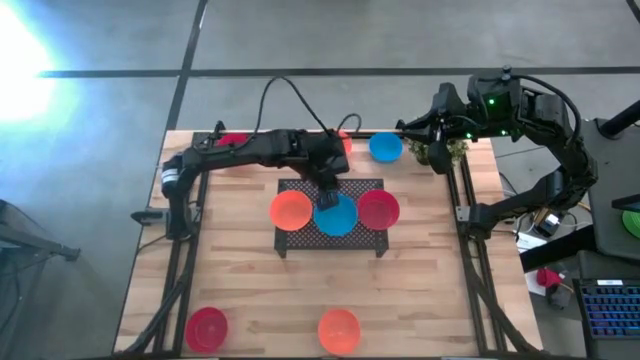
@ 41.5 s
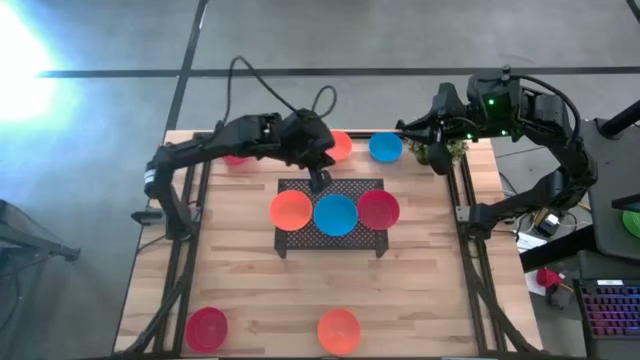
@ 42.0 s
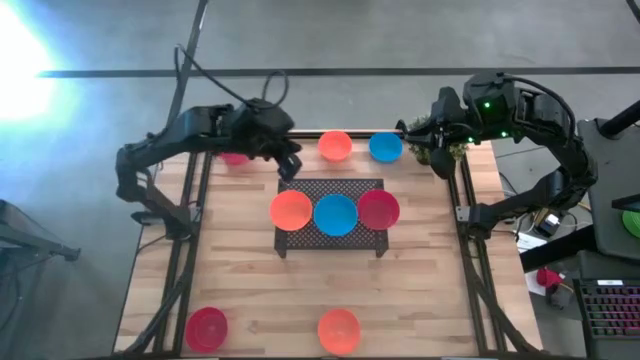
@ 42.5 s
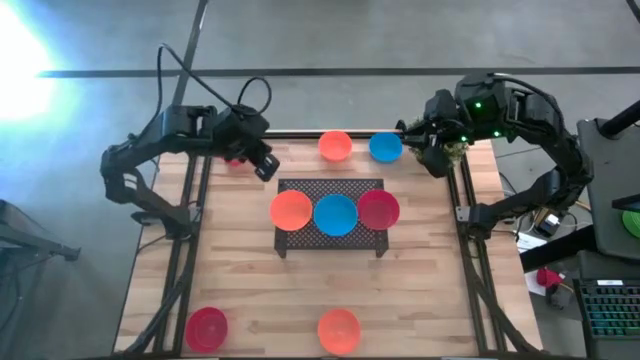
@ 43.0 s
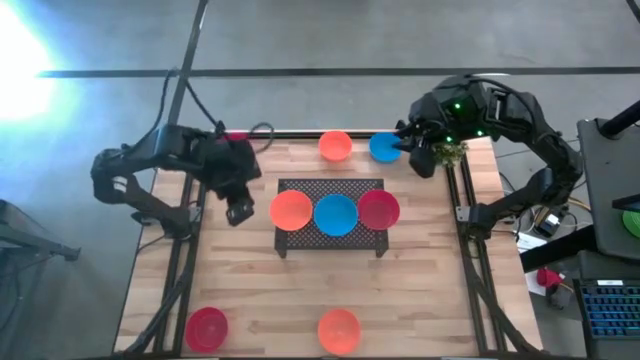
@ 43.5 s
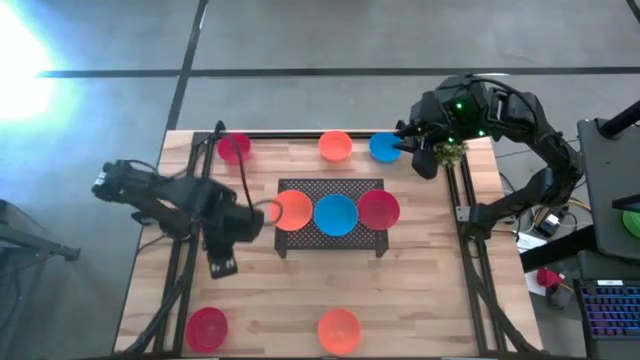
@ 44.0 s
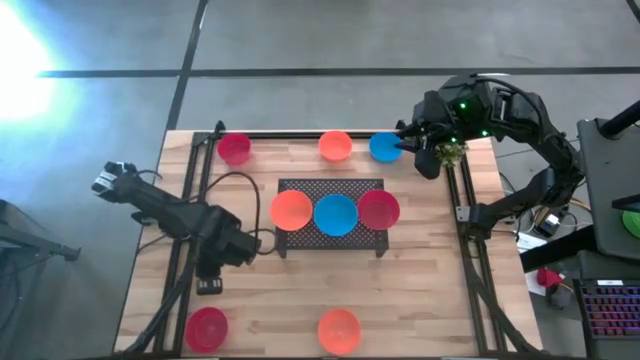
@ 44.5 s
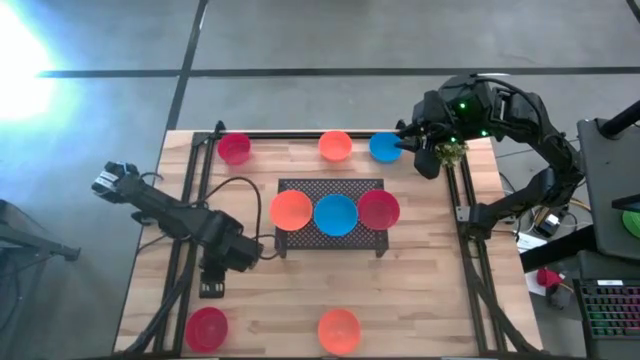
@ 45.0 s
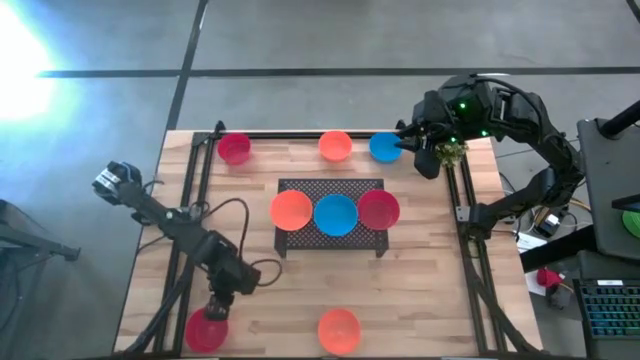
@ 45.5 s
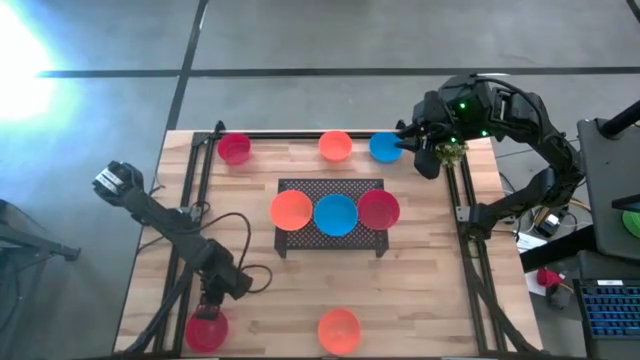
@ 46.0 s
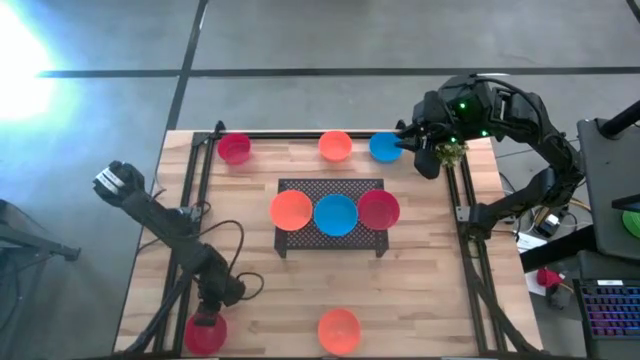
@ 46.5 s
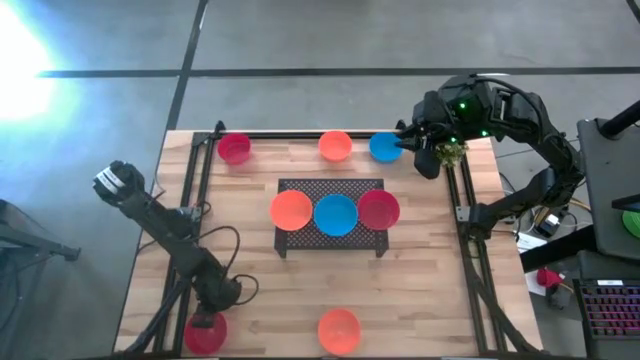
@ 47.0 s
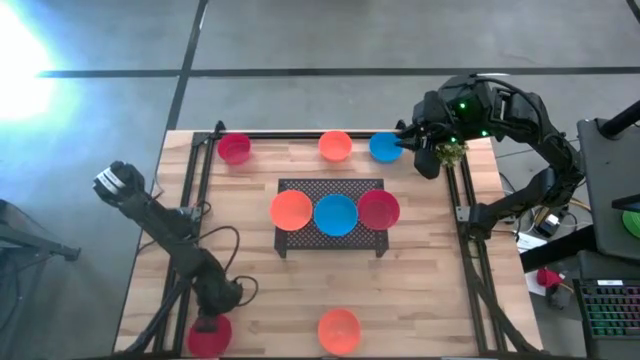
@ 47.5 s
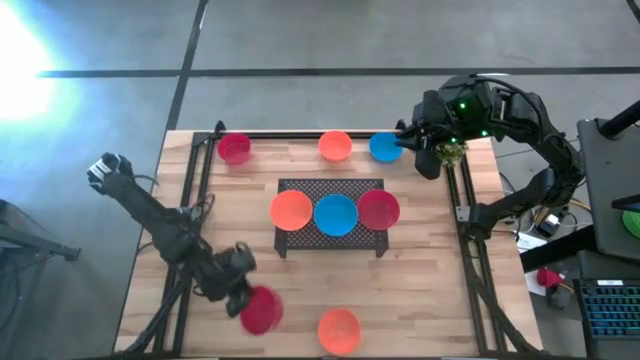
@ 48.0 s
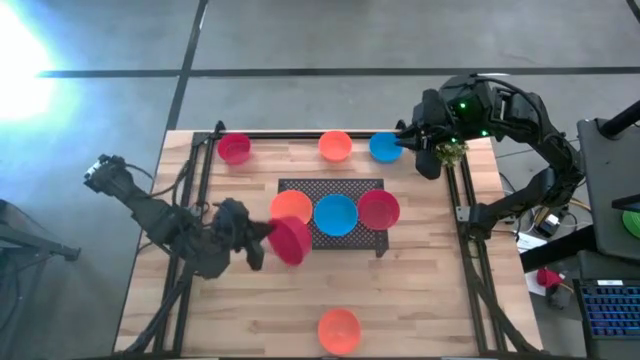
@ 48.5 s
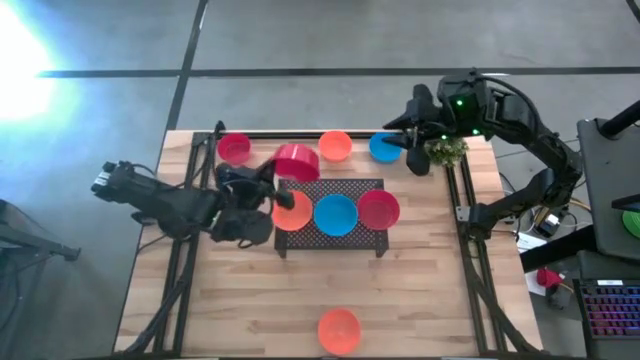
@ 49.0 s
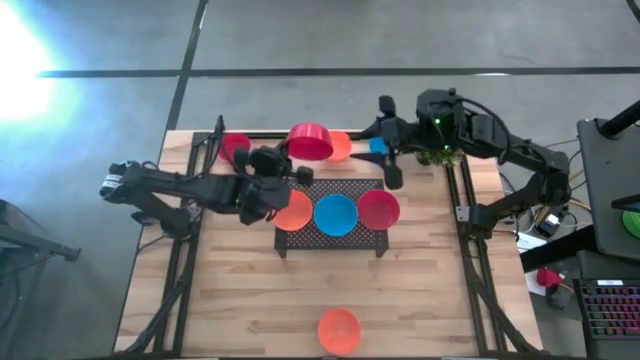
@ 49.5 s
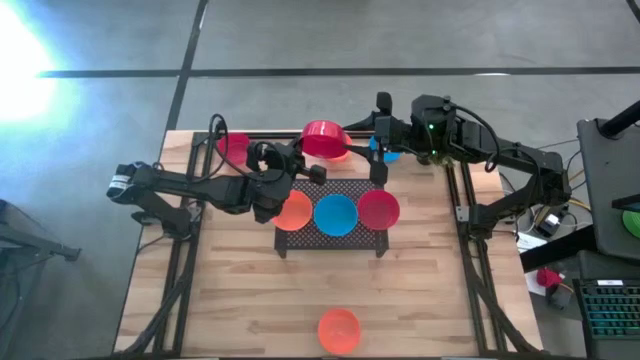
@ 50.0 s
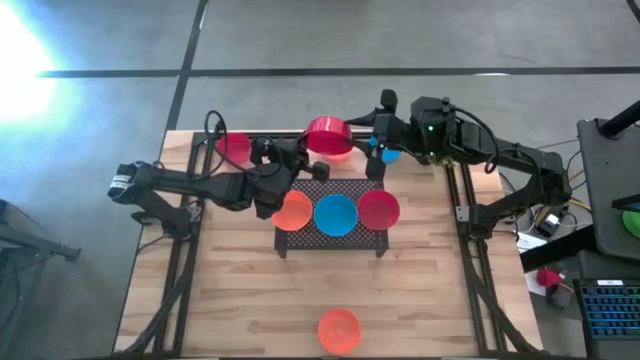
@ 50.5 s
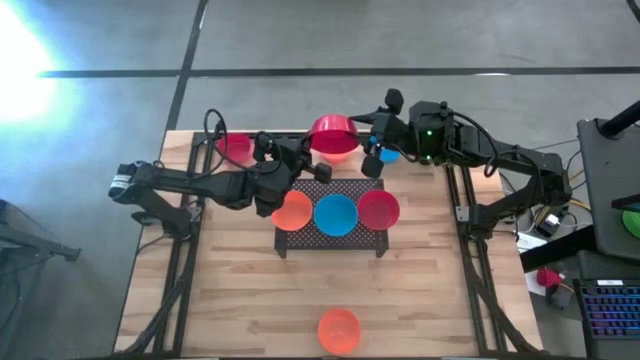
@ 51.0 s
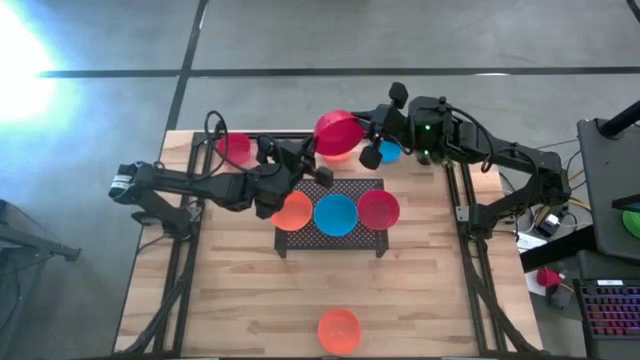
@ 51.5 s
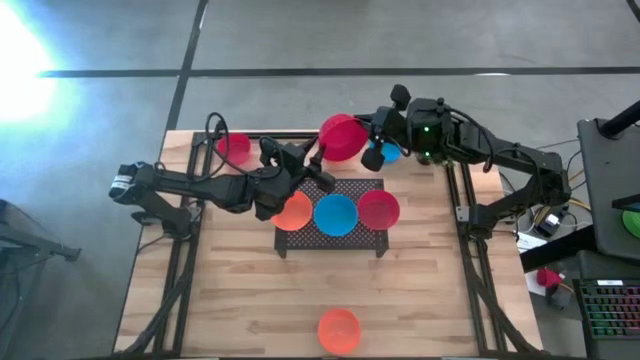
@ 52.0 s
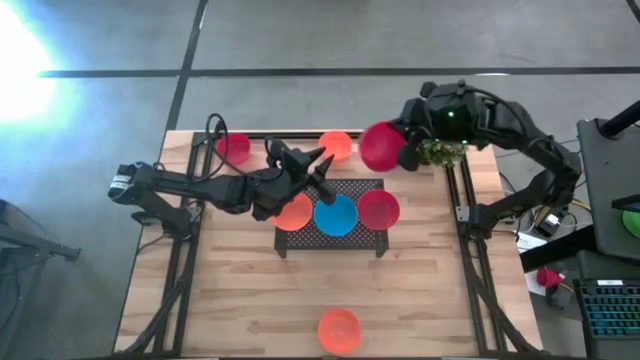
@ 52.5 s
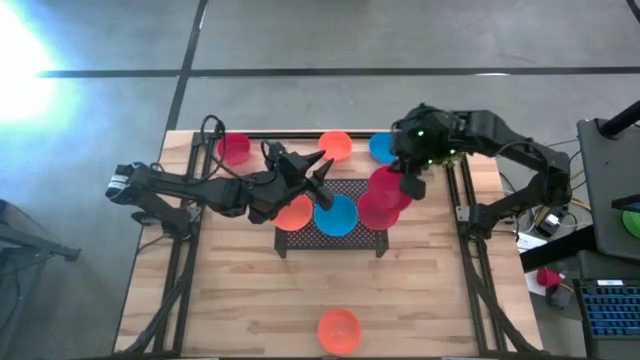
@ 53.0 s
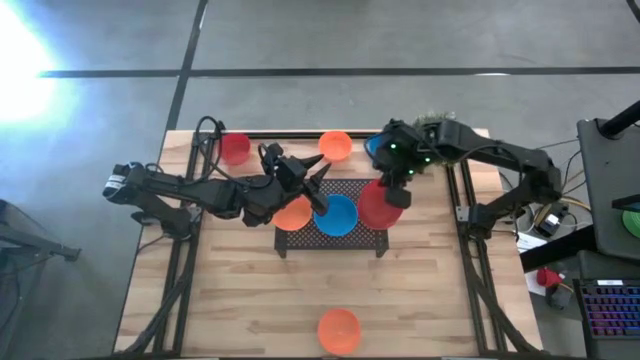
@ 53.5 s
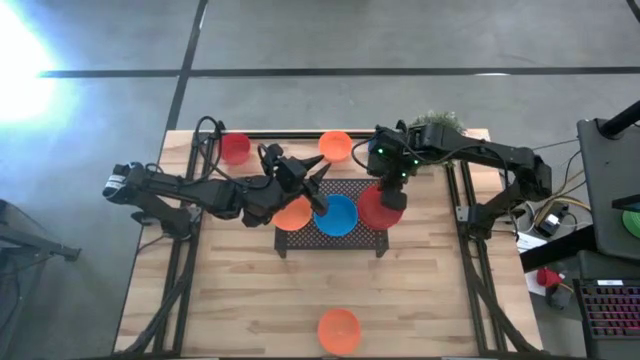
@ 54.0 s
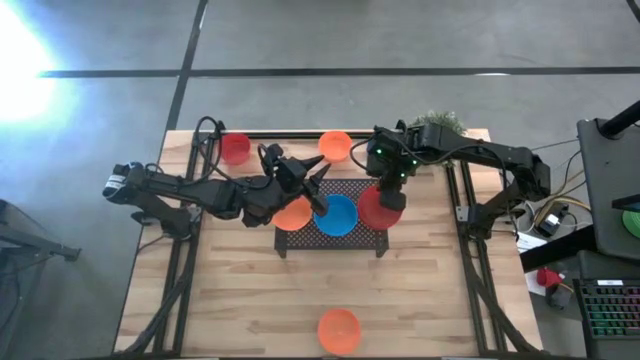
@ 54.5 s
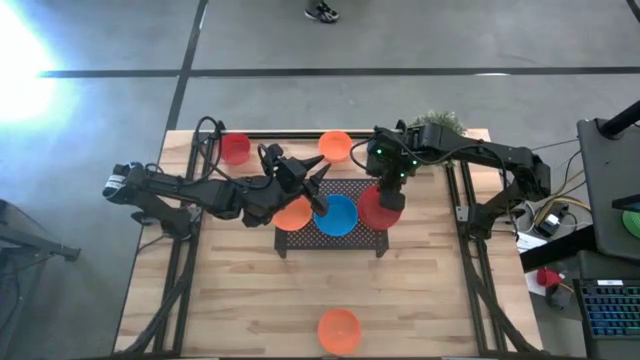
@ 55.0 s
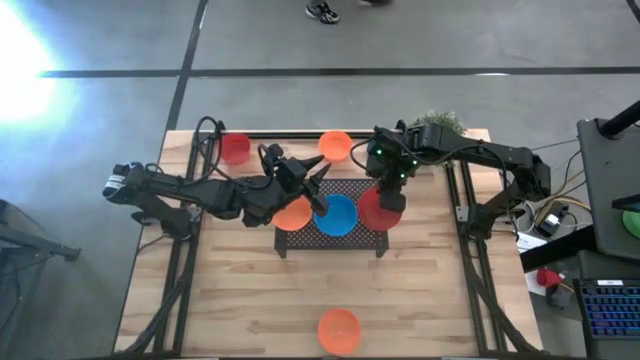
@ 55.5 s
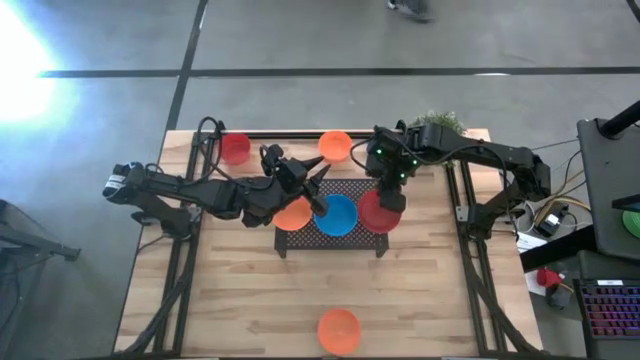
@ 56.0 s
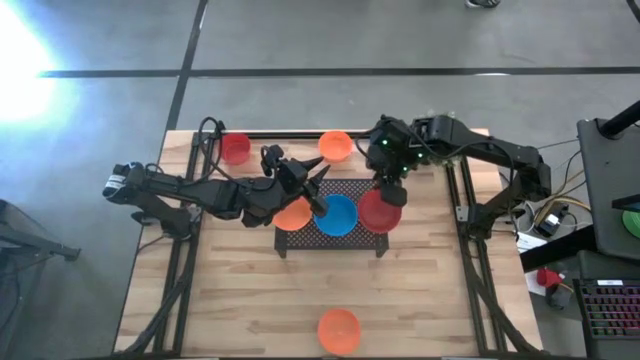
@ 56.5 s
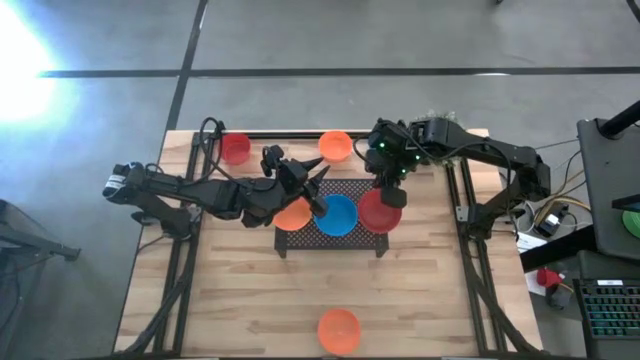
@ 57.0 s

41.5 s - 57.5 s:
Task: Pick & Place Mini bowls
Stack the bottom red bowl on top of the red bowl on the shelf
